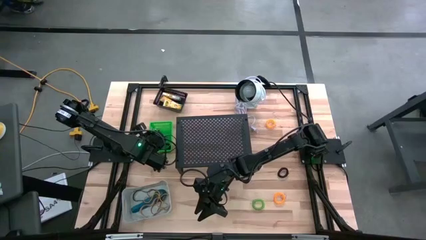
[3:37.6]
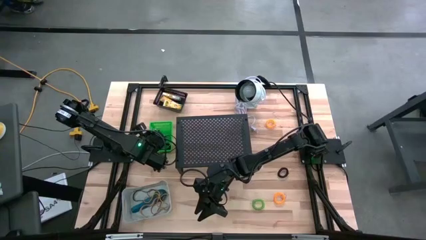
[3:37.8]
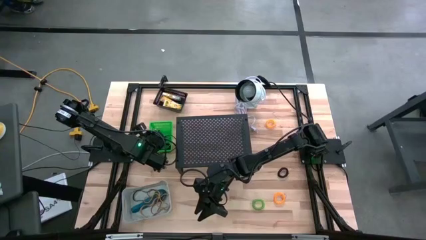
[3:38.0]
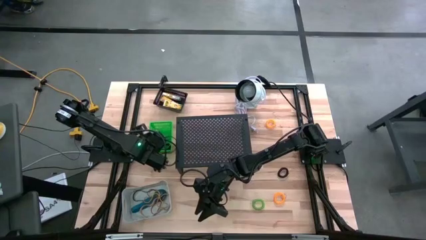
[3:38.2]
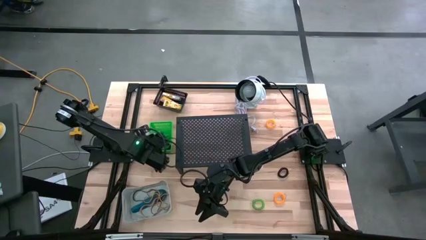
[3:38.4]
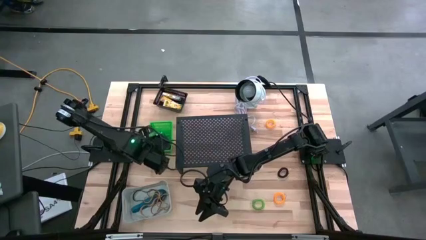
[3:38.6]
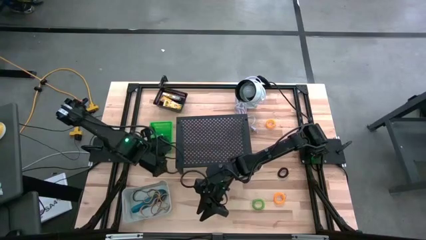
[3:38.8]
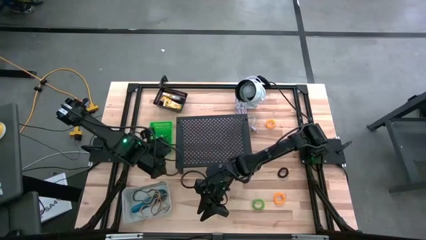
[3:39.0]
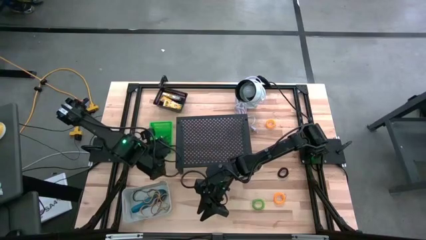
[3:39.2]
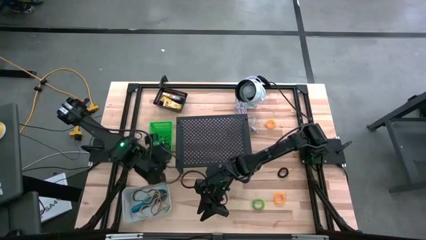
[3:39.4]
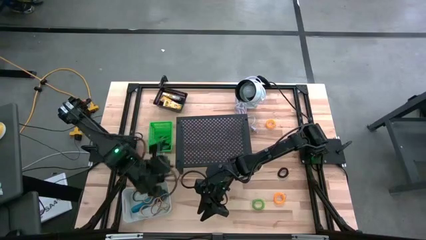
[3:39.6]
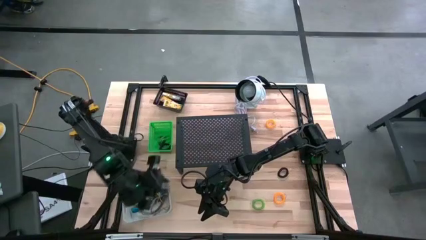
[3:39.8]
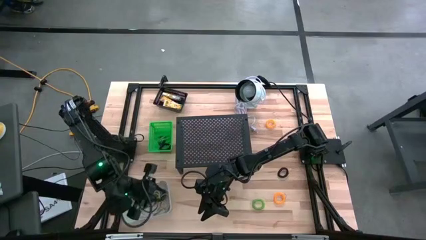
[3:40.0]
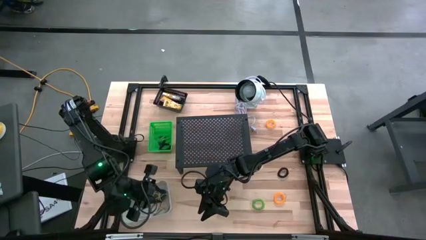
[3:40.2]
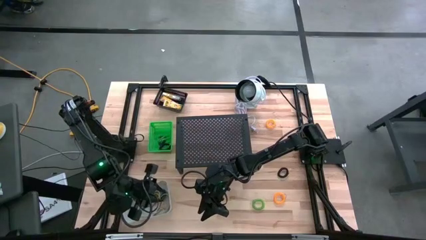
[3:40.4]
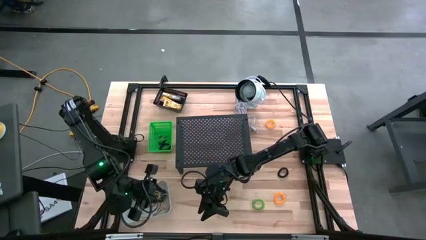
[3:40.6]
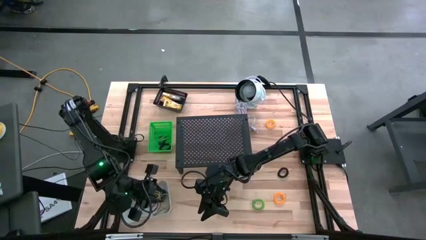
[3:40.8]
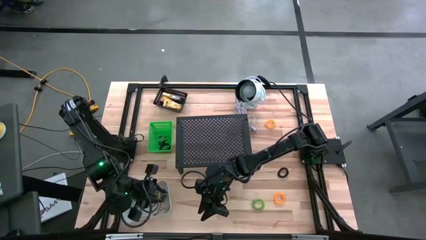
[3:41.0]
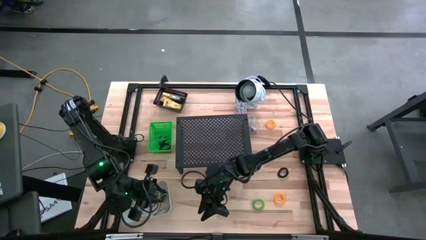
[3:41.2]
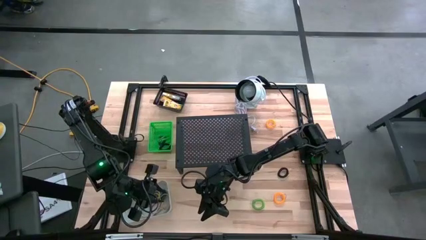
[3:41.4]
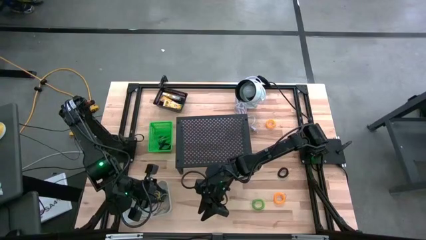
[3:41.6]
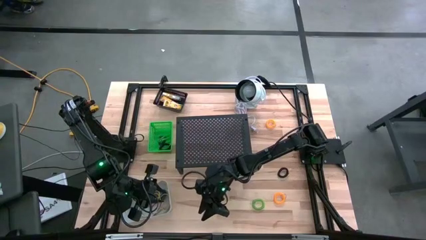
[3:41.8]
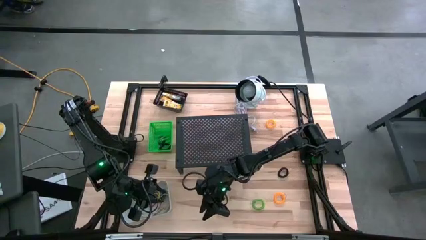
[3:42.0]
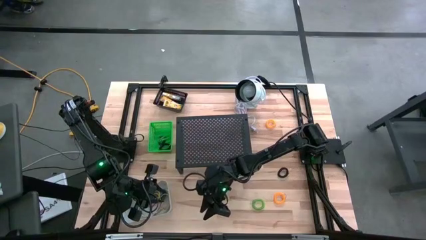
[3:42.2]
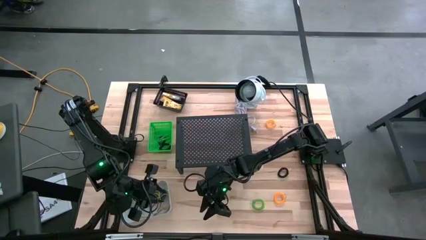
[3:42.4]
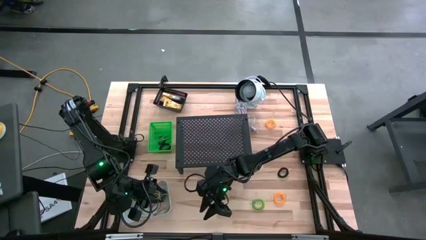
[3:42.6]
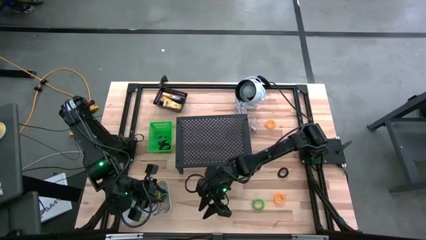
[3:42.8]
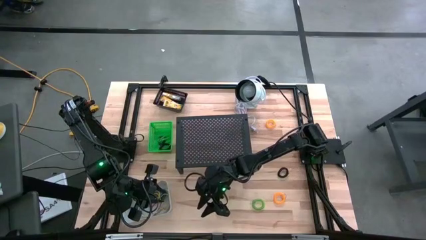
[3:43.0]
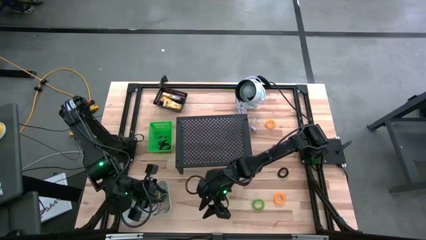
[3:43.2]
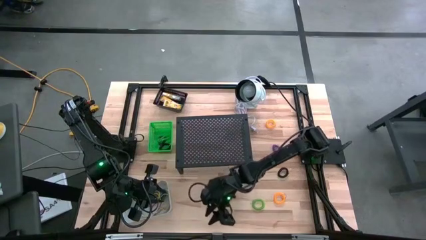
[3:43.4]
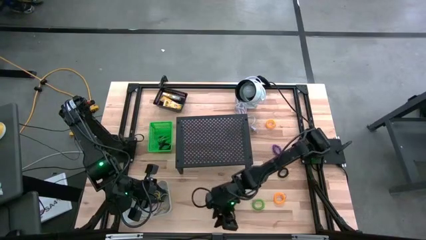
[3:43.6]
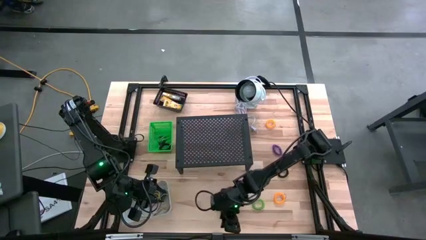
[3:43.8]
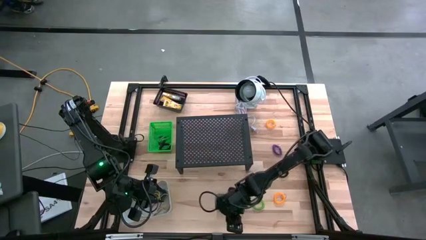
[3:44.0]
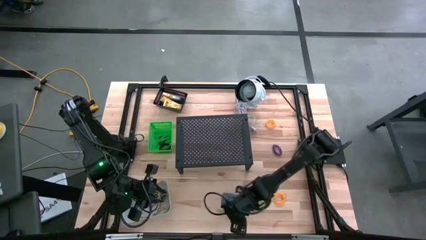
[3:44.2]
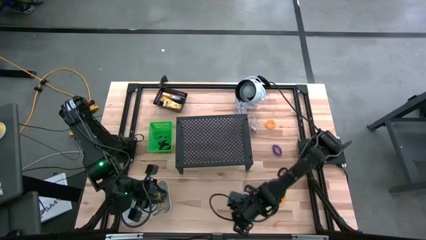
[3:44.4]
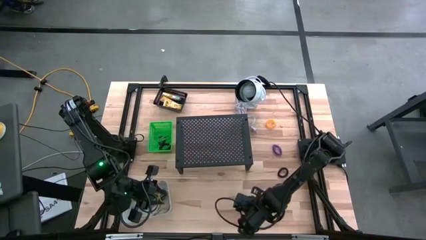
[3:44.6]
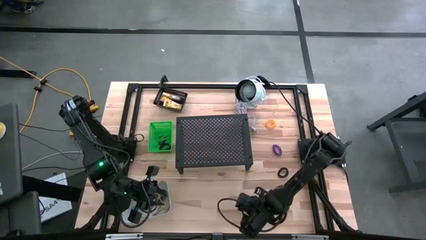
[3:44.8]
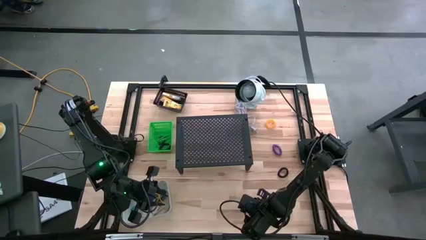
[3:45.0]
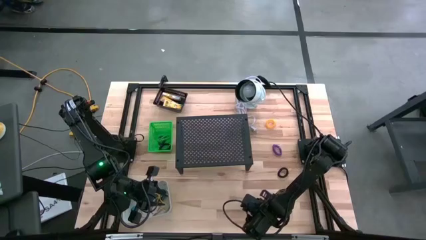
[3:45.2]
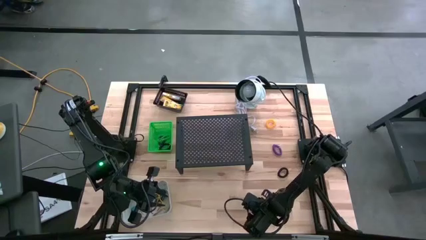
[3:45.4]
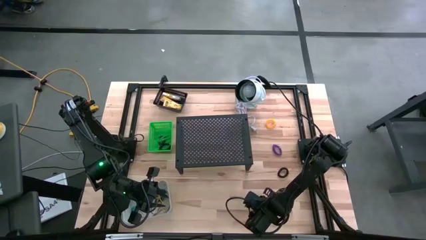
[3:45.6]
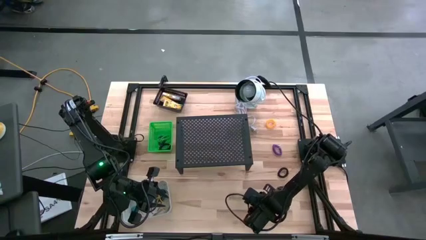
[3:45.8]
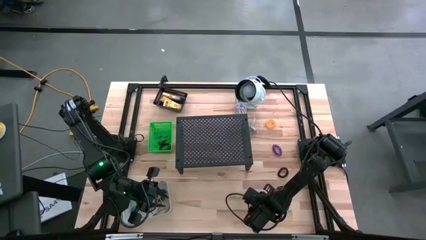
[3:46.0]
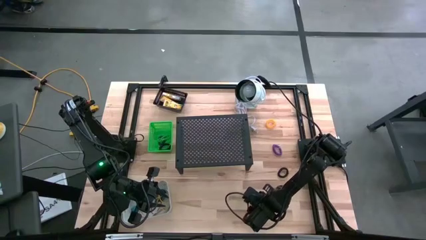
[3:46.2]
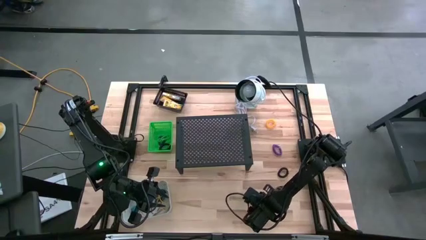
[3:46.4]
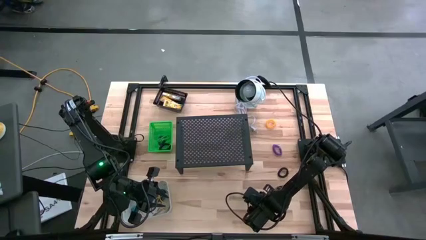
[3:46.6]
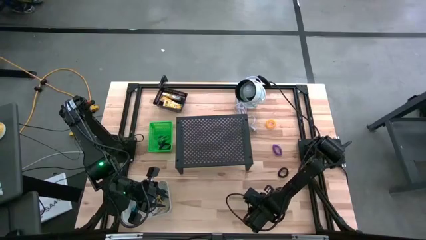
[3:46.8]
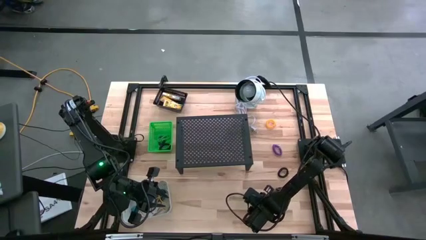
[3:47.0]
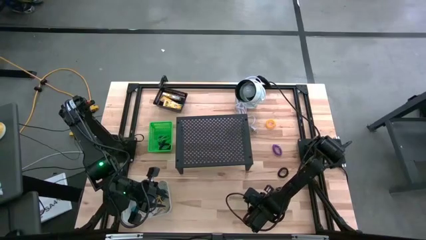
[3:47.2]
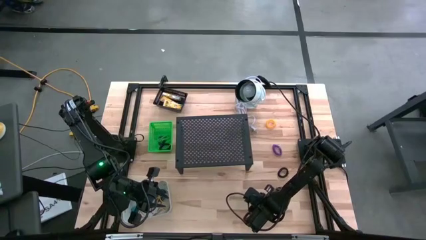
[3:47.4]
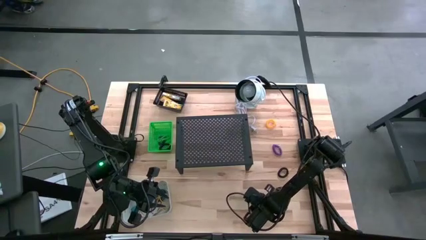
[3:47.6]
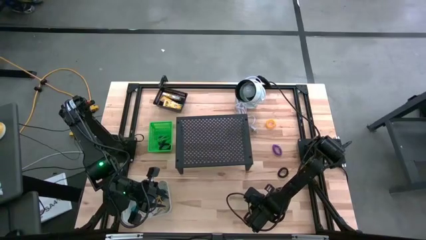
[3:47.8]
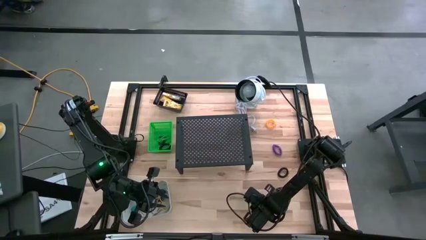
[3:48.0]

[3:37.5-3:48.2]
Task: Pick & Place Office Desk Supplies
Put the green spring keychain into the green bin

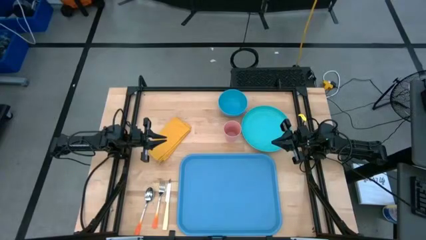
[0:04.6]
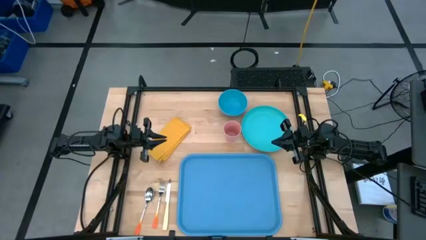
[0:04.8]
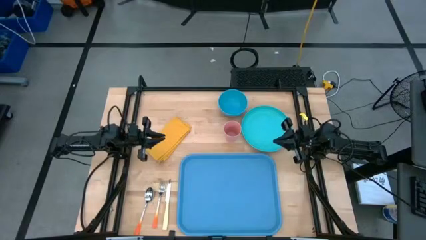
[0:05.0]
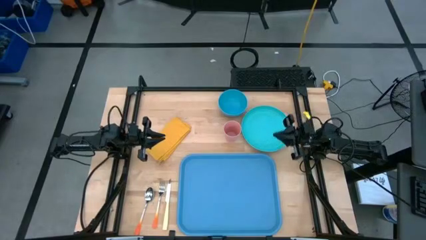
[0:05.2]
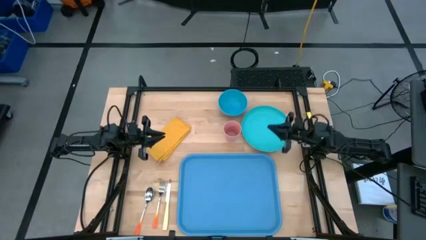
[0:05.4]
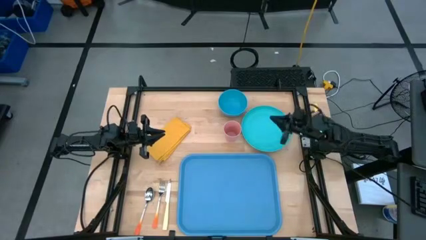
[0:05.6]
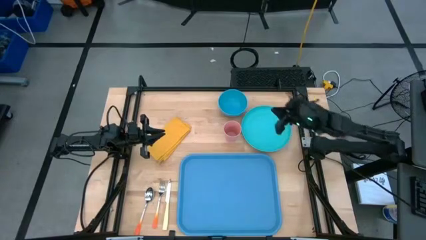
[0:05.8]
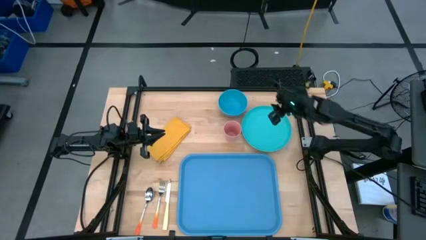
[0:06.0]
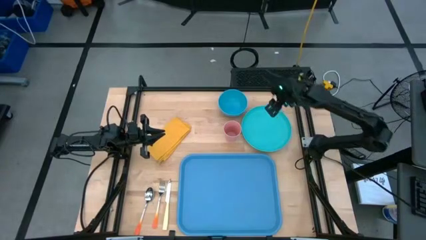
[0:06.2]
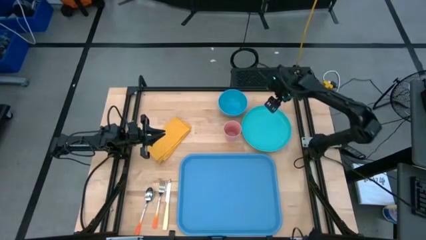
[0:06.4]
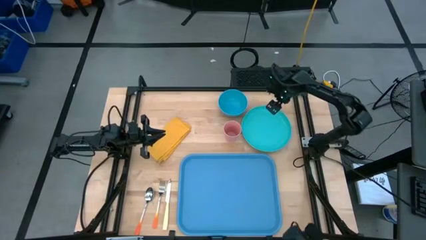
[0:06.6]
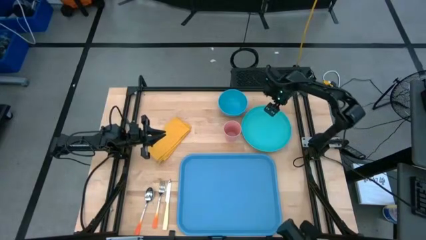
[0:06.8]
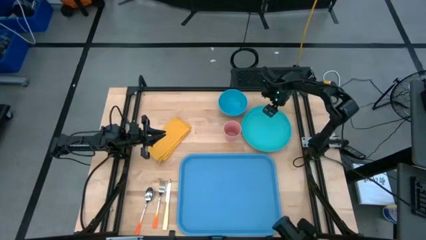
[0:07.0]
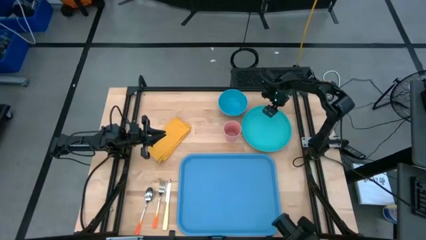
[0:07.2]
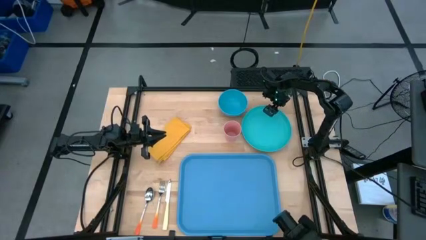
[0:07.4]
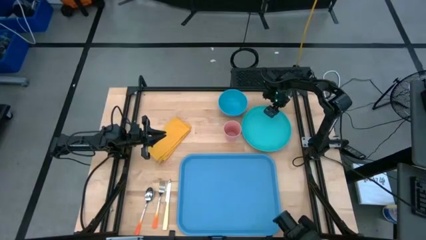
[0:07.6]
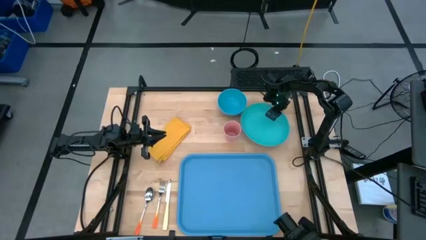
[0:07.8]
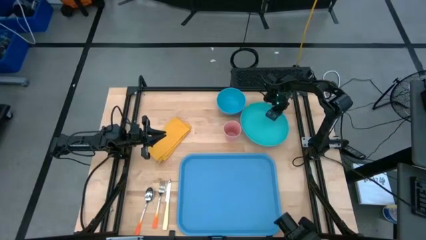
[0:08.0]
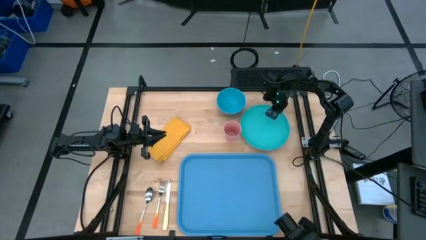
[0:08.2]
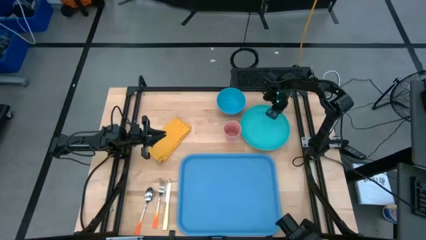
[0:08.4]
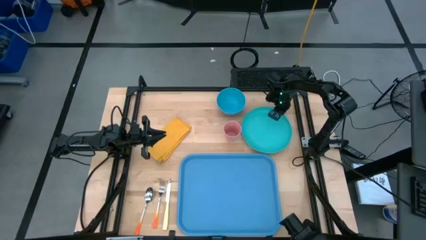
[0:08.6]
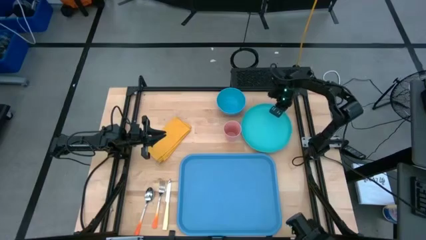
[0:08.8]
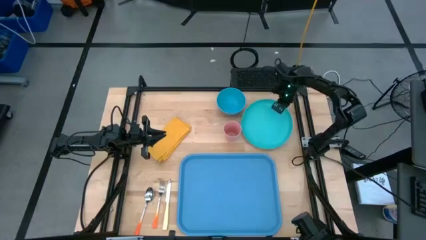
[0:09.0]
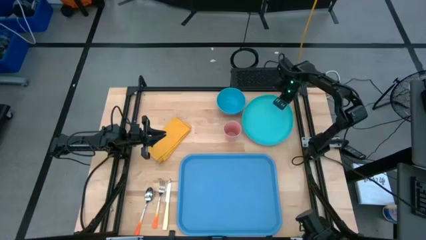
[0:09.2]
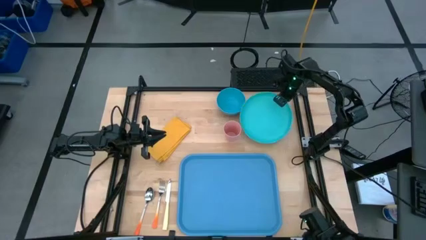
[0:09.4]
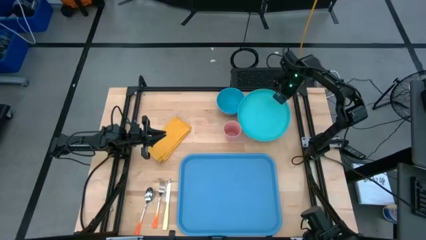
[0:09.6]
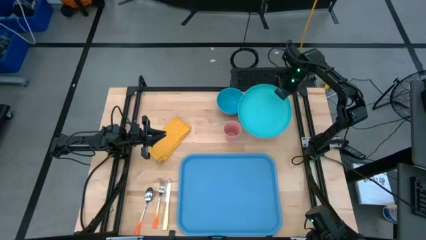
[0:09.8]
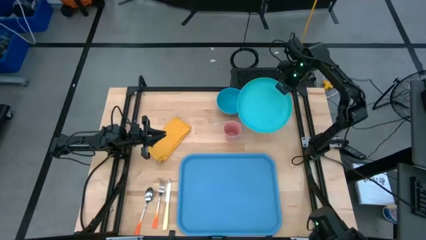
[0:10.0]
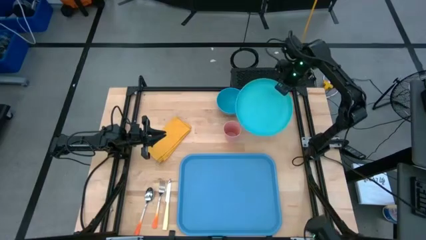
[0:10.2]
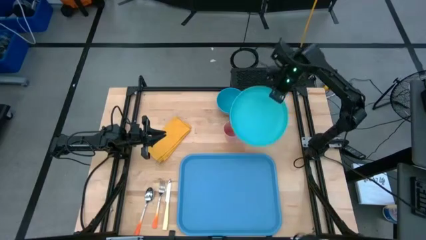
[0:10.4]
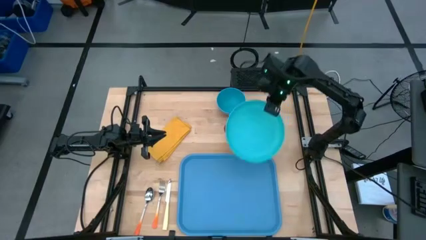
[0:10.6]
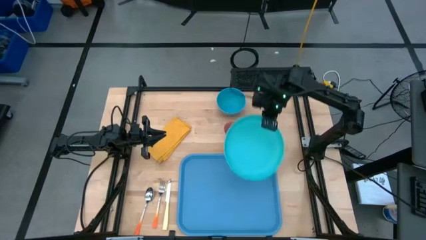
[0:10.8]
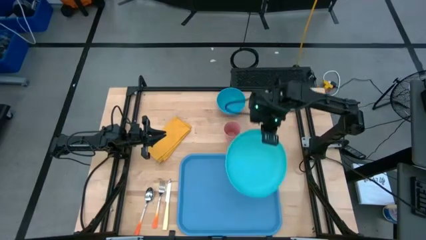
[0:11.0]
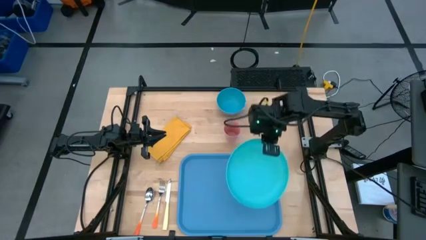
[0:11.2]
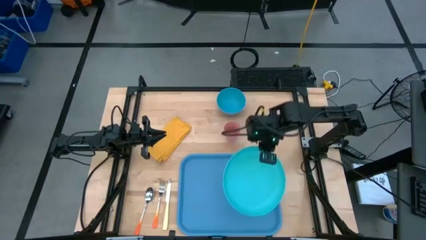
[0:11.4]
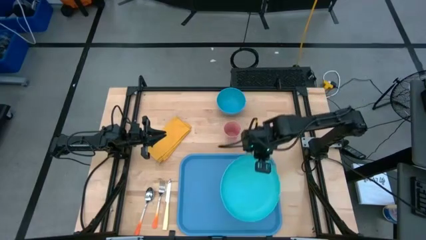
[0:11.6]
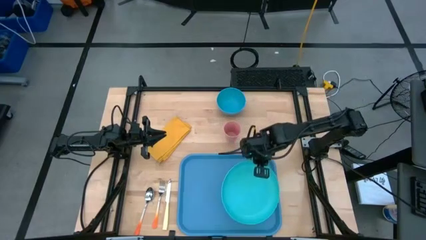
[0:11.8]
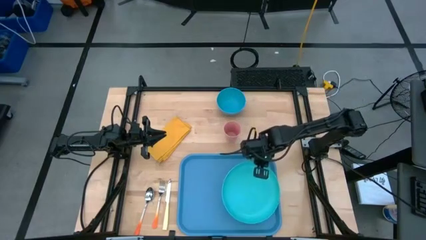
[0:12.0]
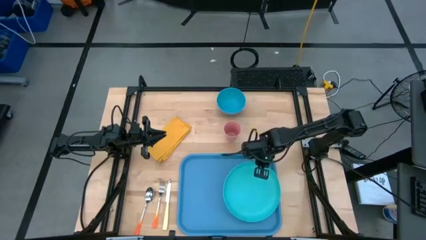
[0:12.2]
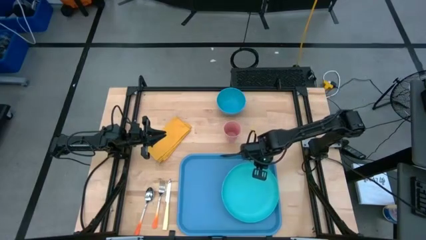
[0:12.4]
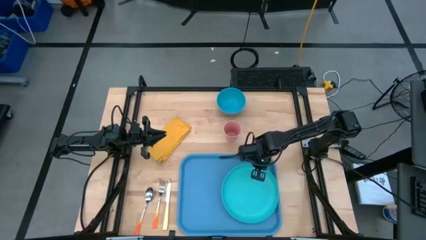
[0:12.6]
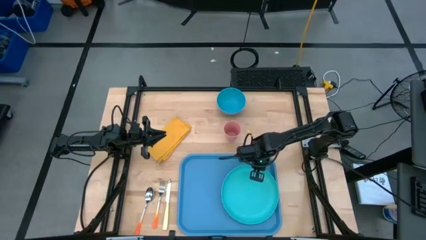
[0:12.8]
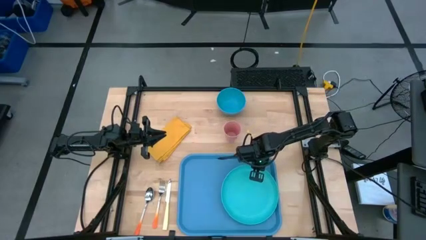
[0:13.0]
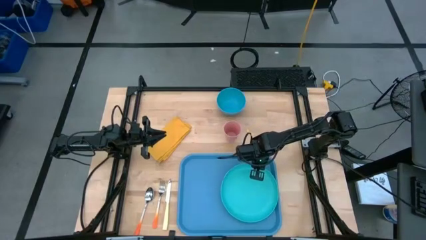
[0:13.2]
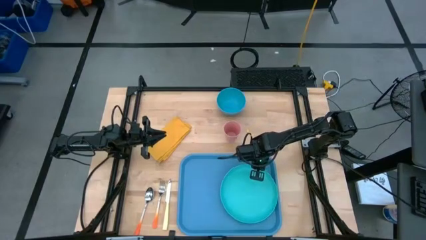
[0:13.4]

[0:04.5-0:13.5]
Task: Set up tray
Put the green plate on the right side of the blue serving tray
